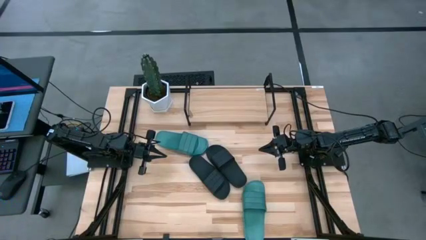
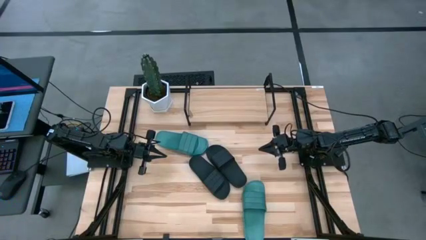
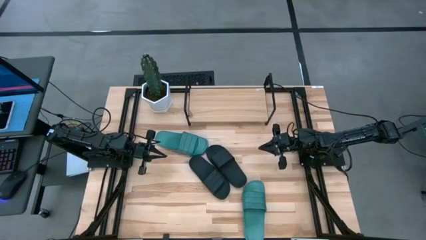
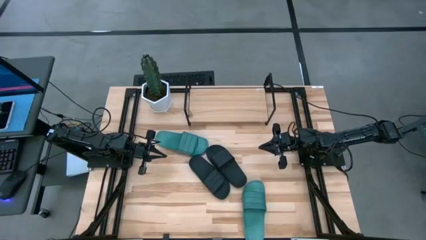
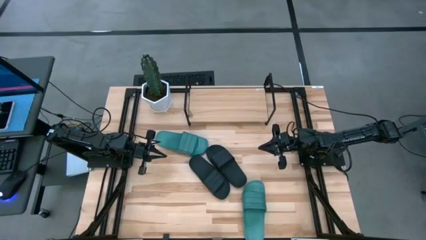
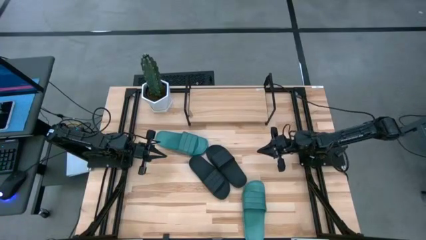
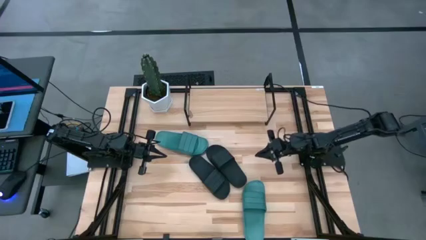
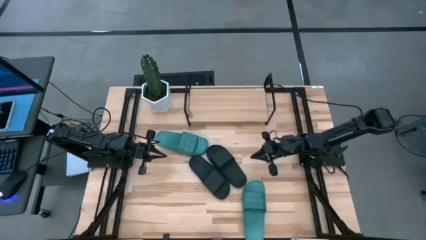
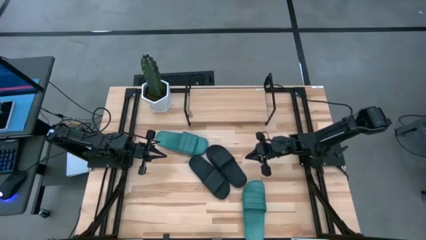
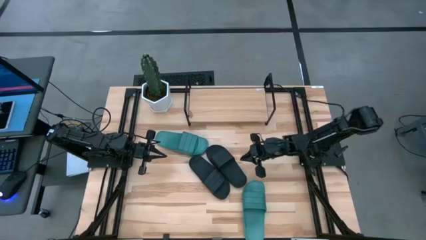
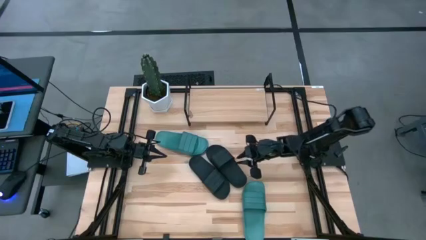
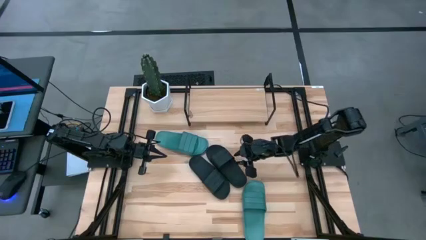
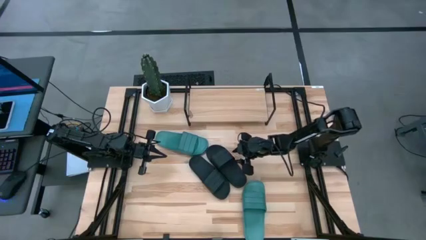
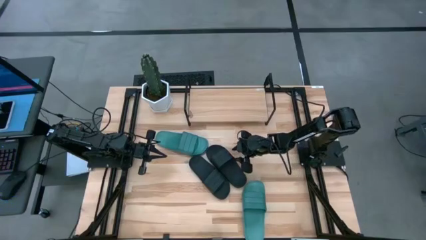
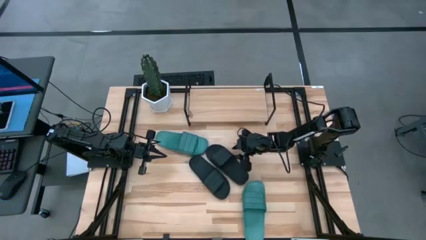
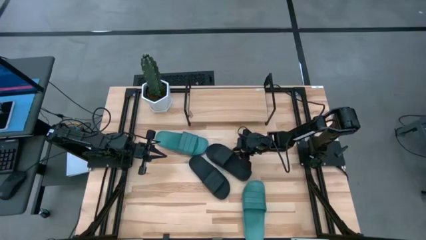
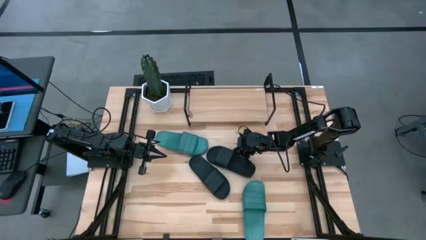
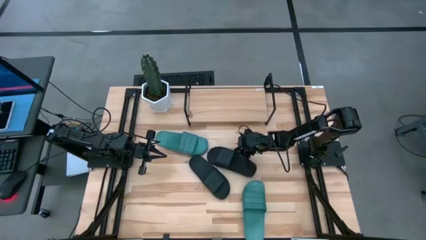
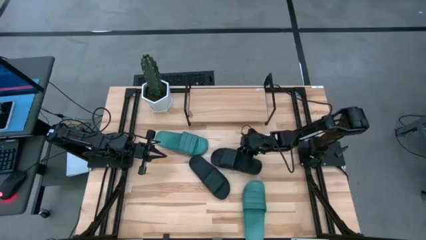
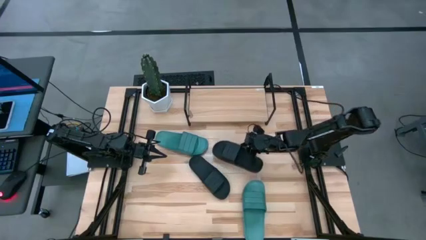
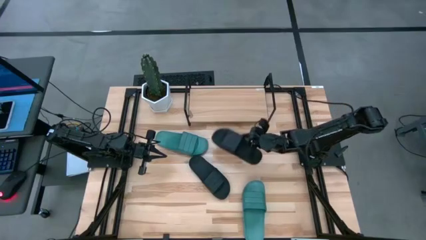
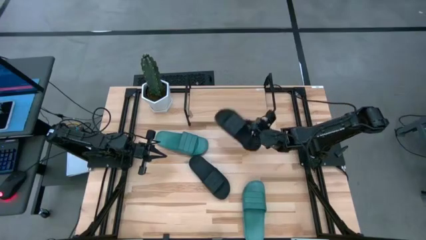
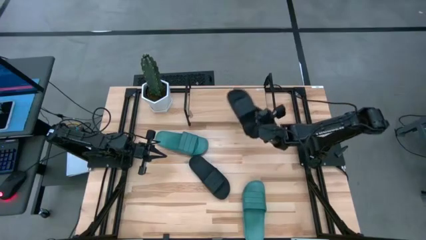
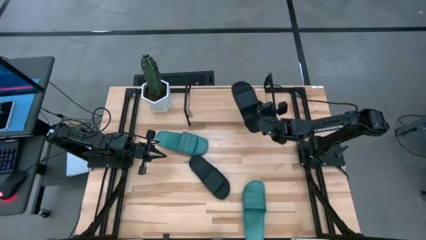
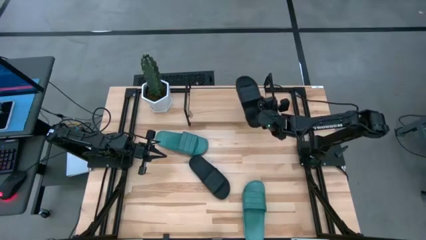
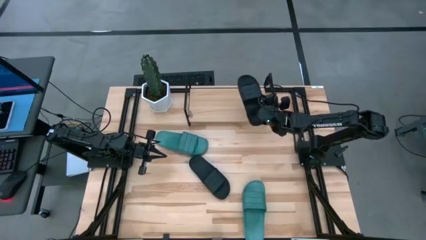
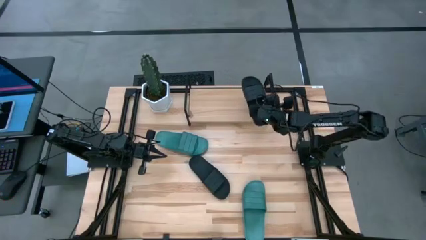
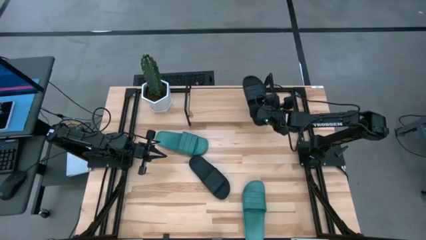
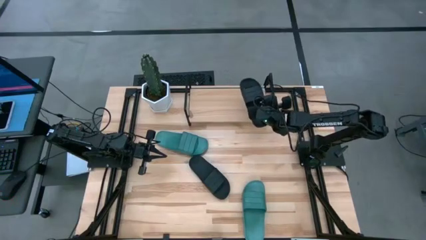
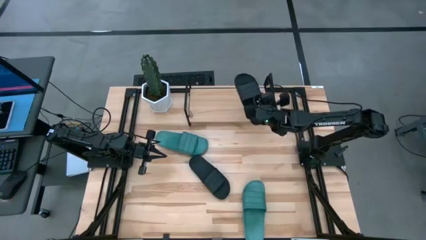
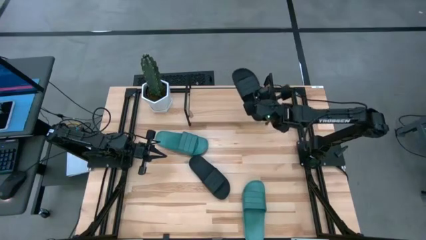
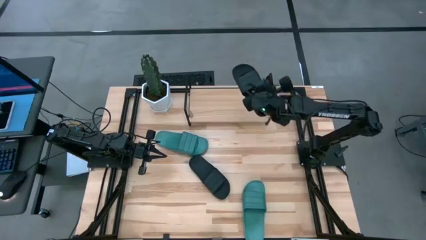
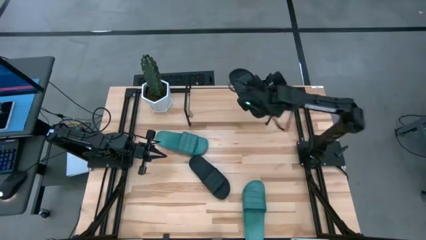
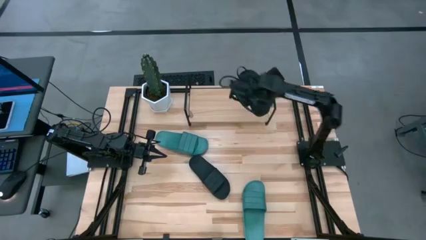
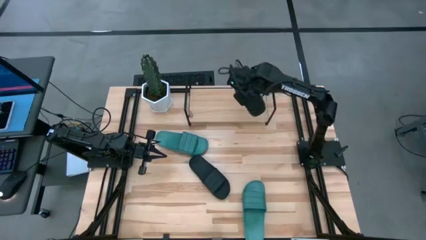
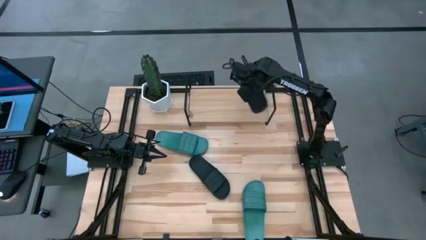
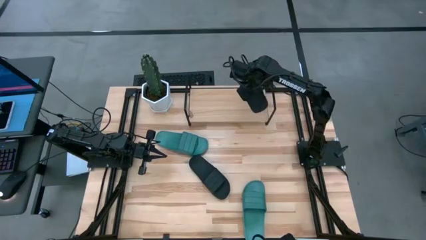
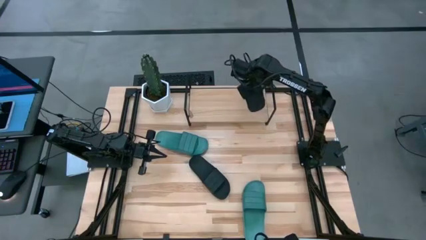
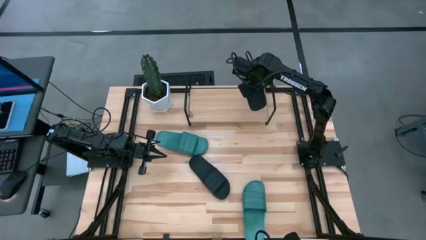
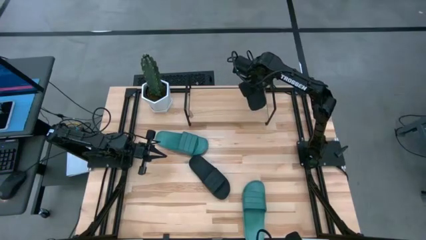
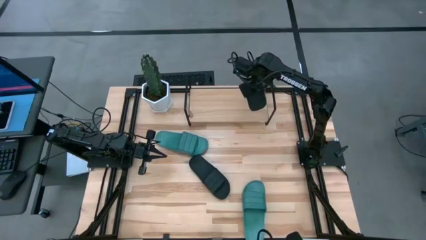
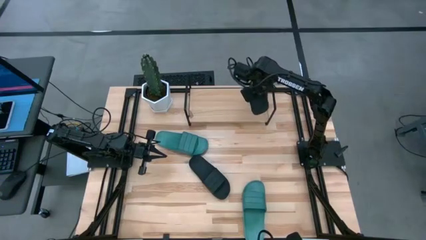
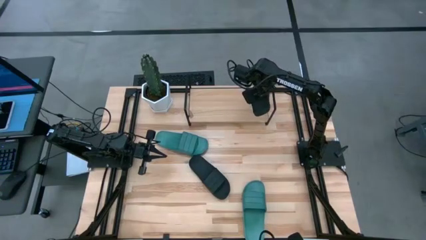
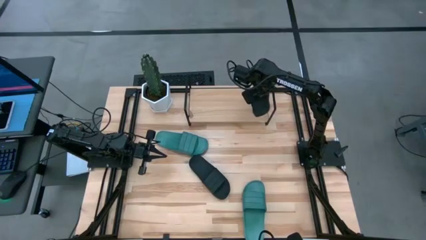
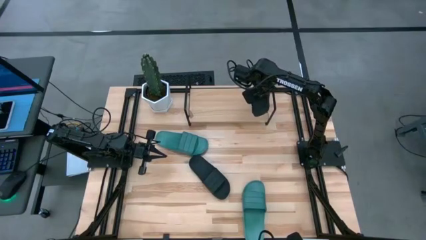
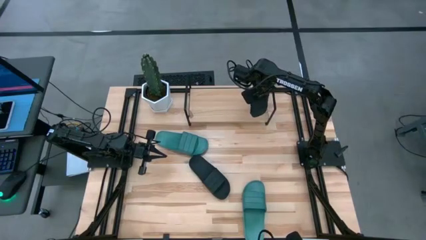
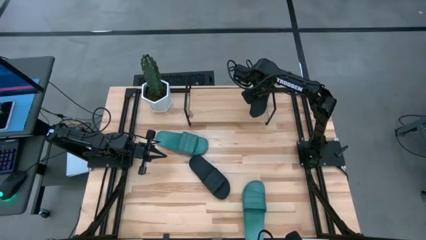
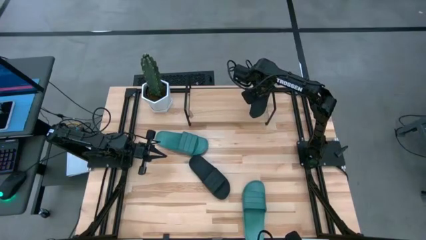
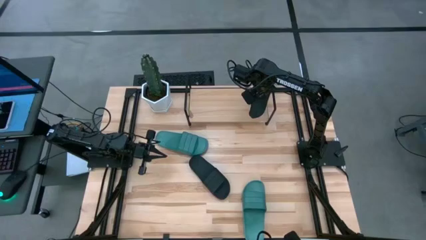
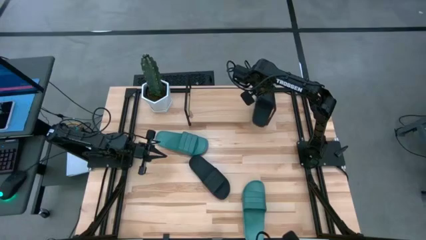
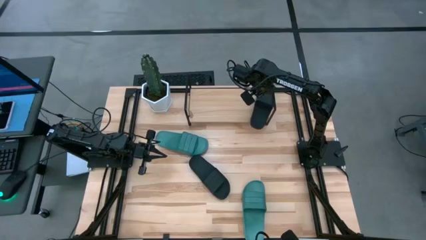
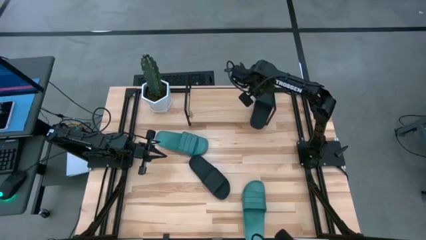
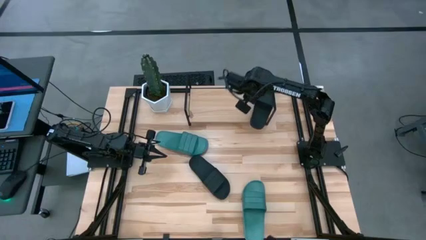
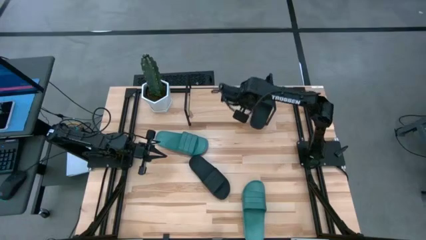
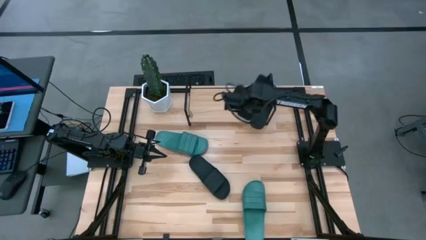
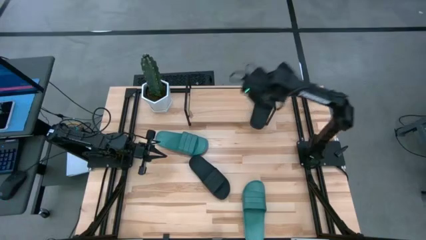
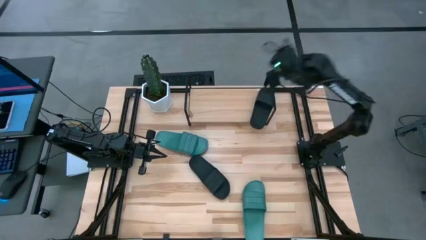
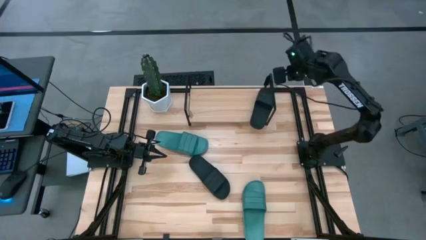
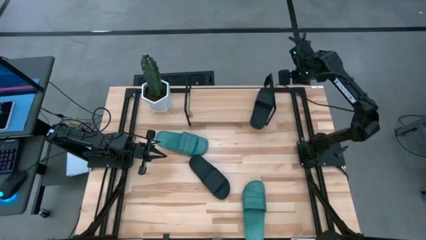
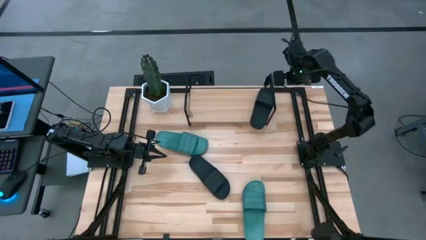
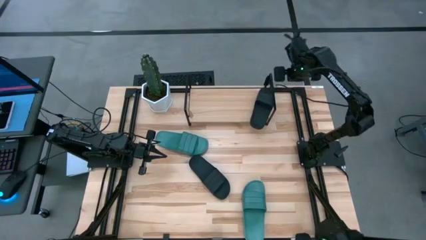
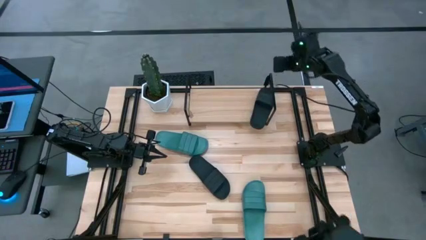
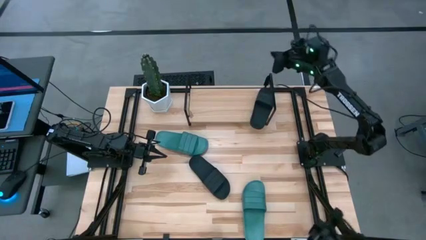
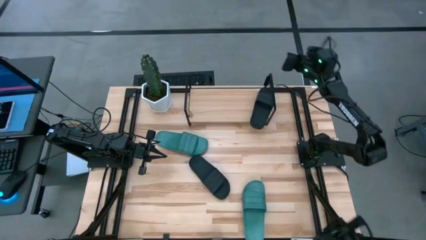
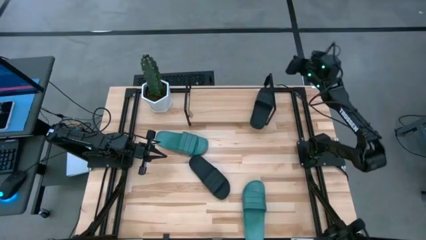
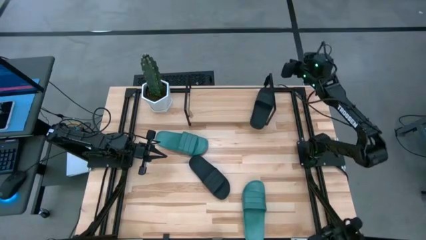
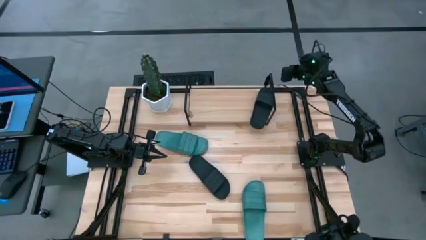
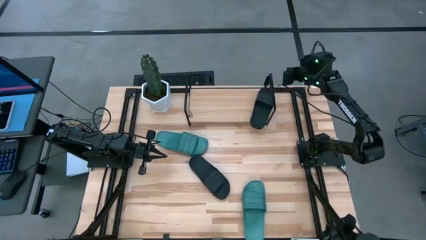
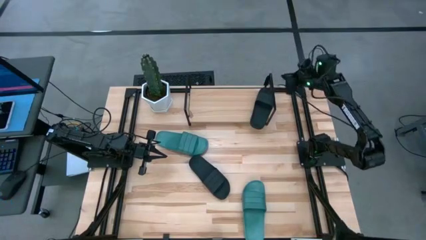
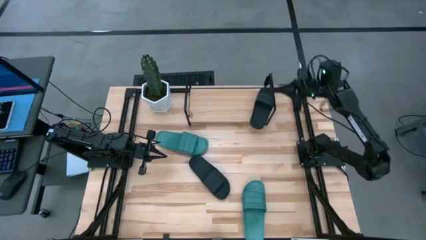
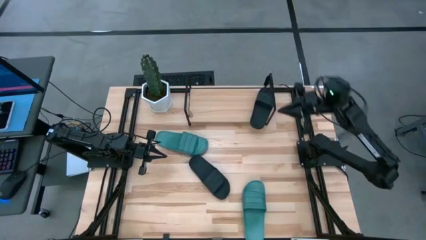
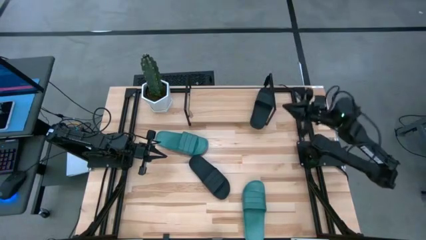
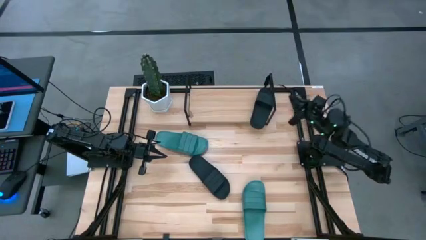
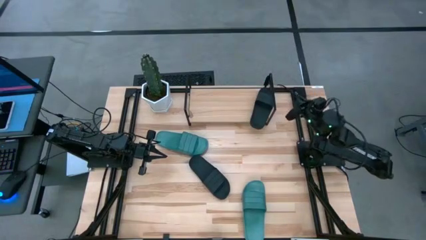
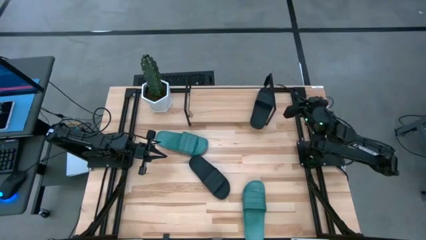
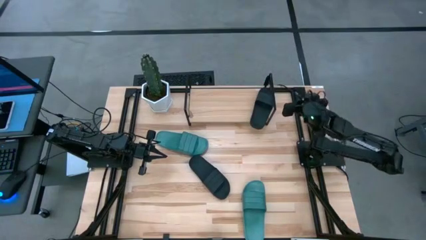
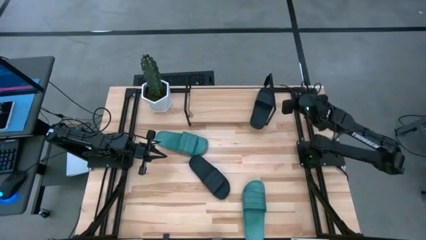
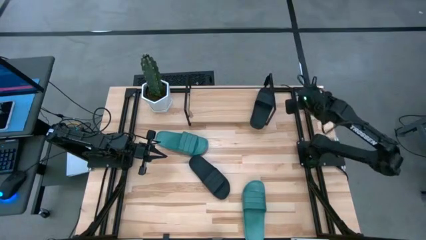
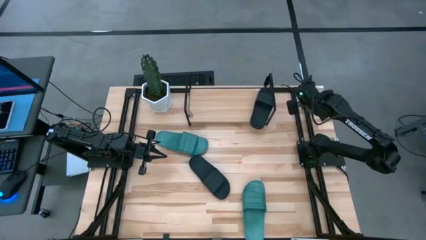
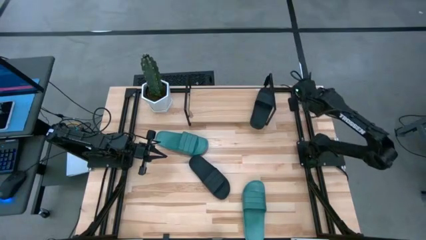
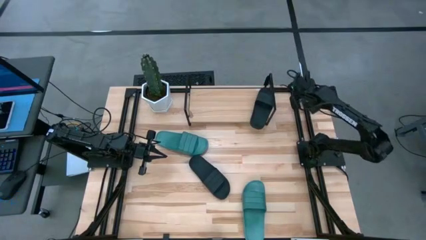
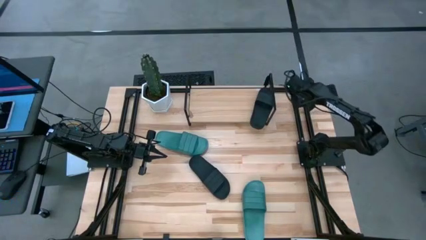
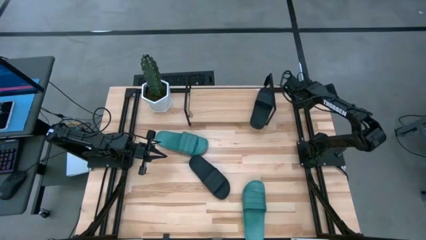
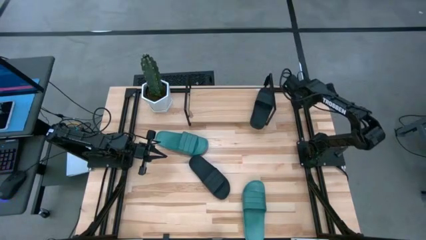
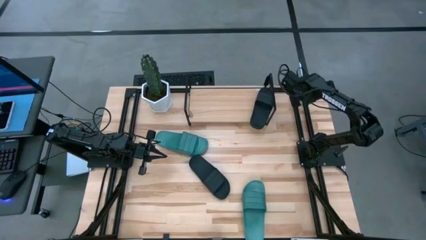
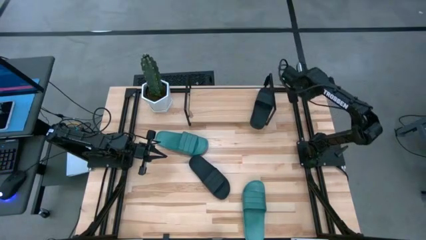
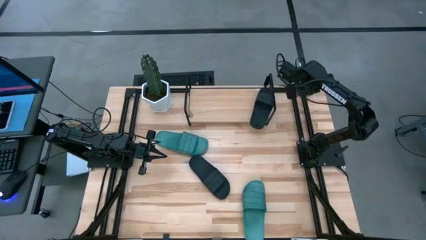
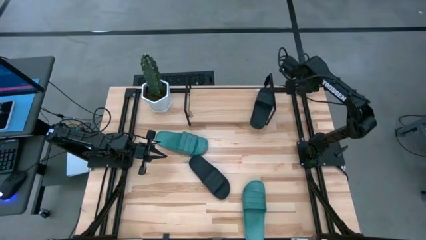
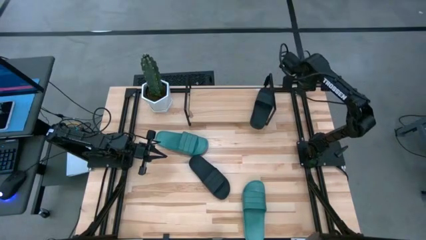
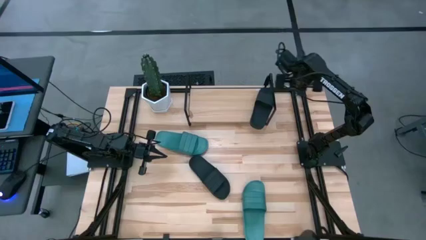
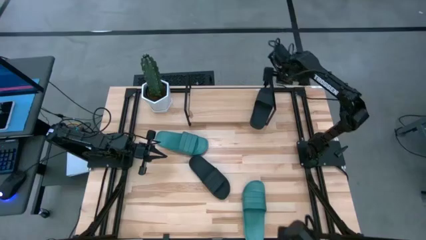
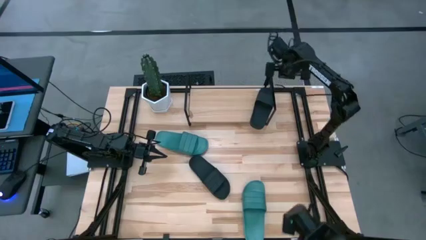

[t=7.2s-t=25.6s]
Task: Pick and place slides into the shelf
Put the right black slide on the shelf
